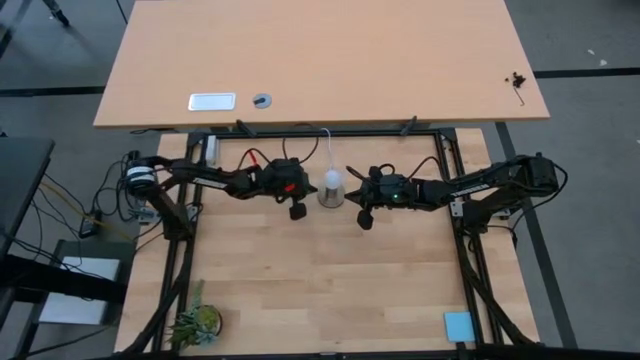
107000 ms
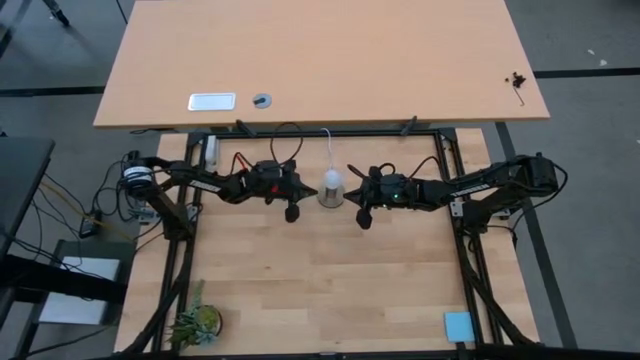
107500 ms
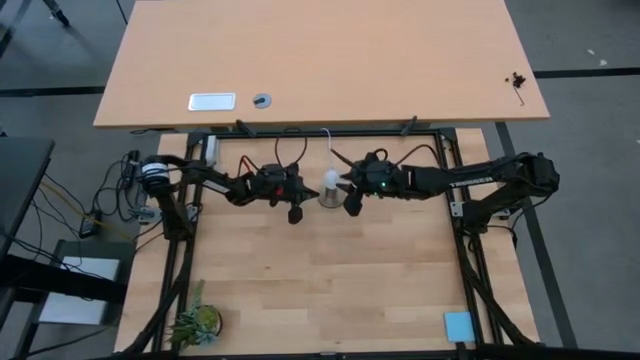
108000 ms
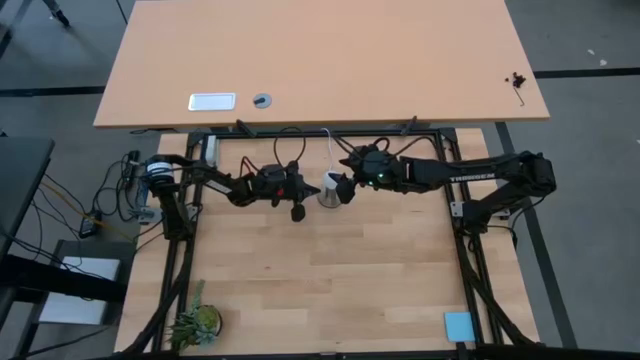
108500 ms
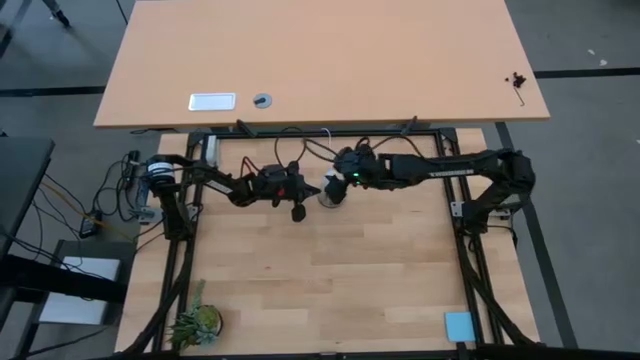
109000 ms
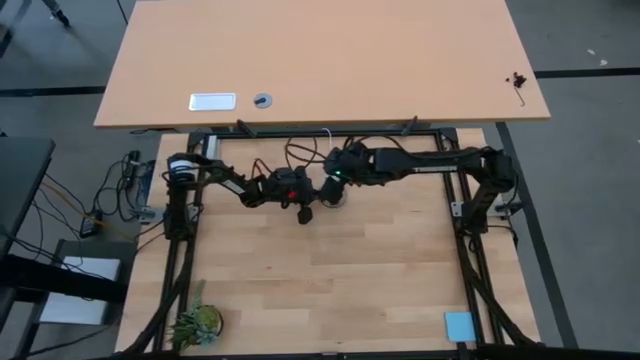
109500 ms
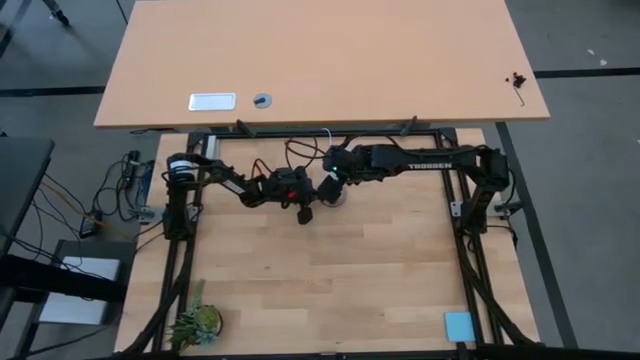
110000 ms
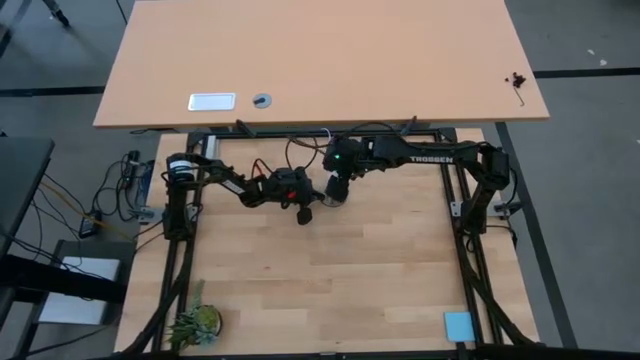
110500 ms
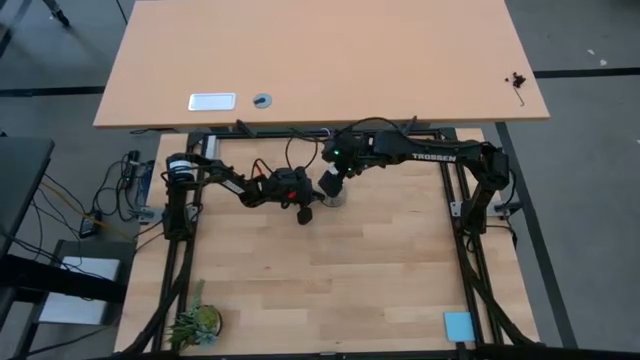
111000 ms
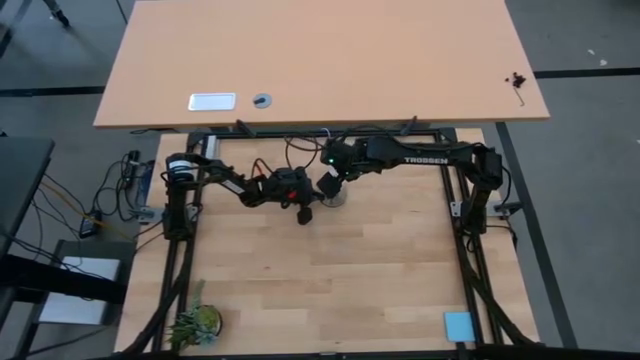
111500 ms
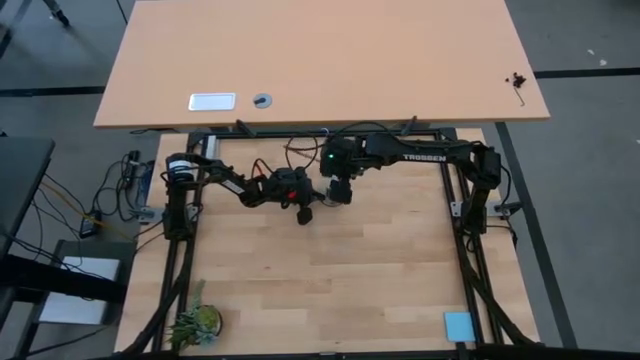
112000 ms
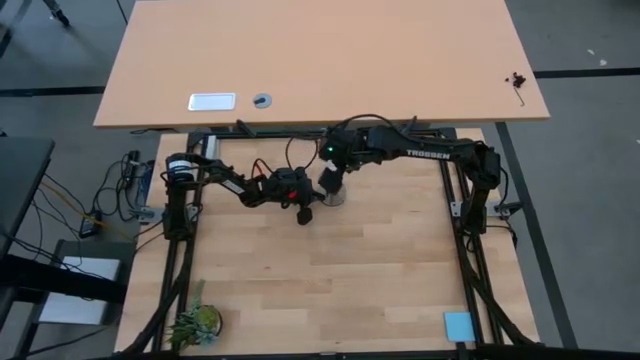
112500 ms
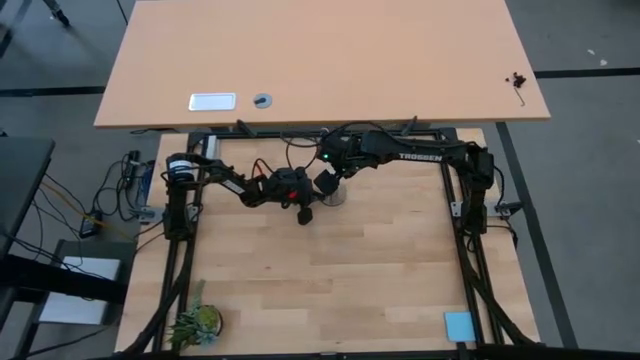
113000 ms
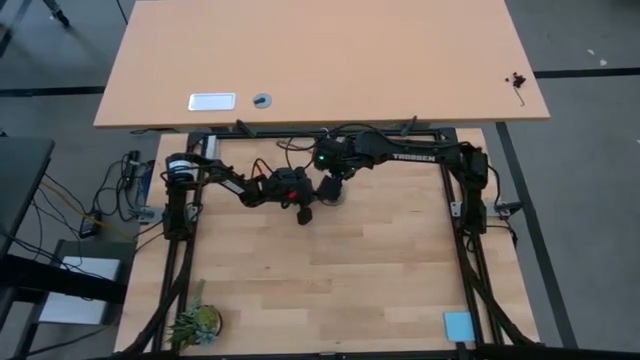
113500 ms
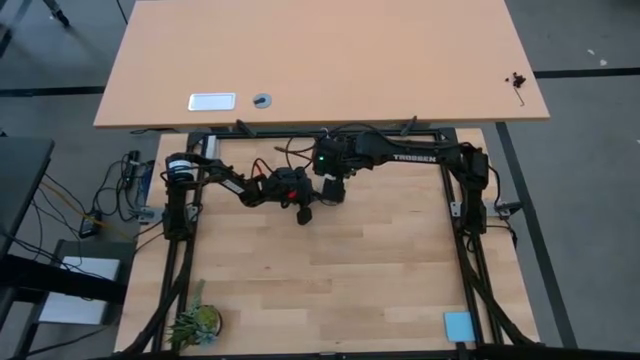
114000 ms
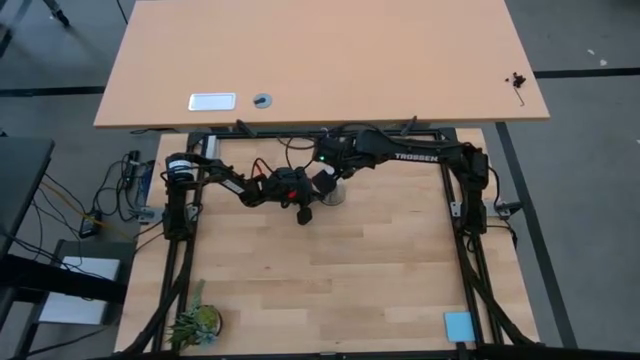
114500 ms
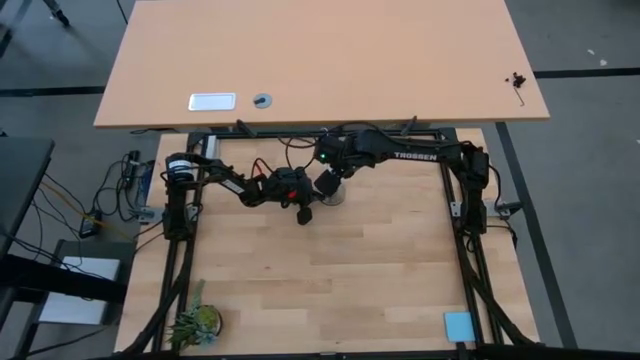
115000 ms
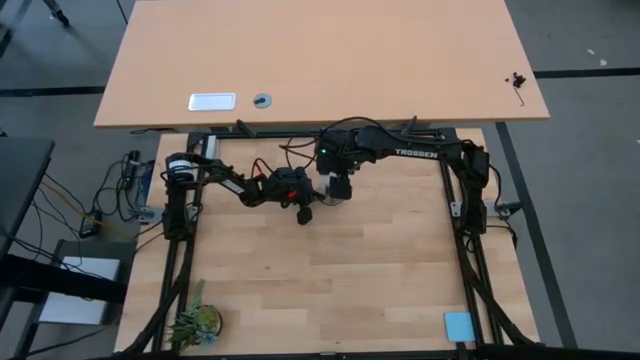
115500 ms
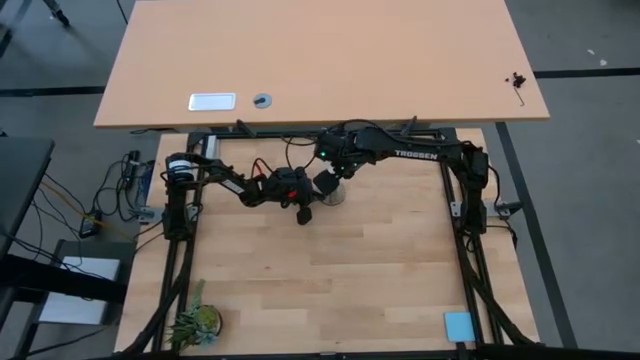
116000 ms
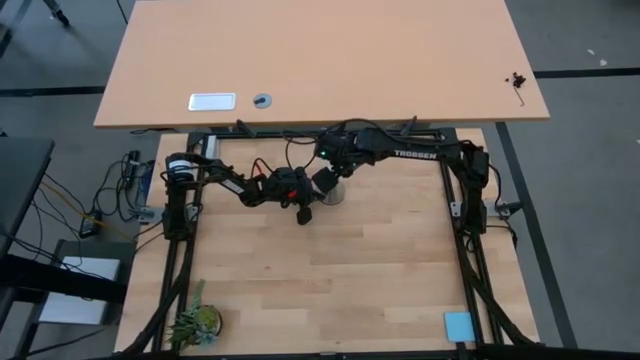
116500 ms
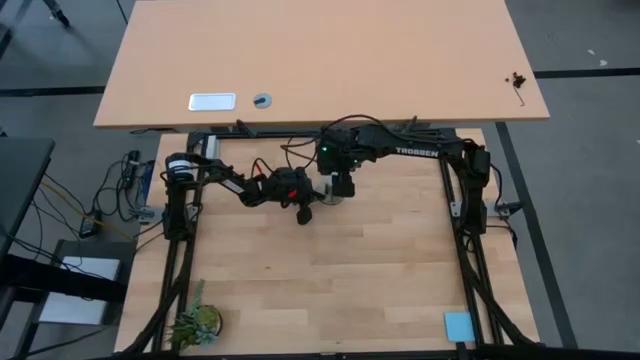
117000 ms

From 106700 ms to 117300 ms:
Task: Screw lightbulb
Remove the white lightbulb from the gold lamp

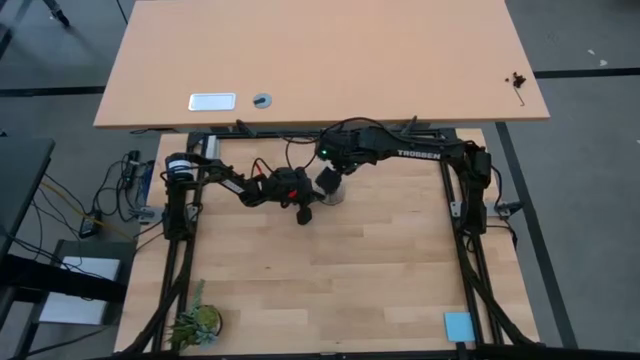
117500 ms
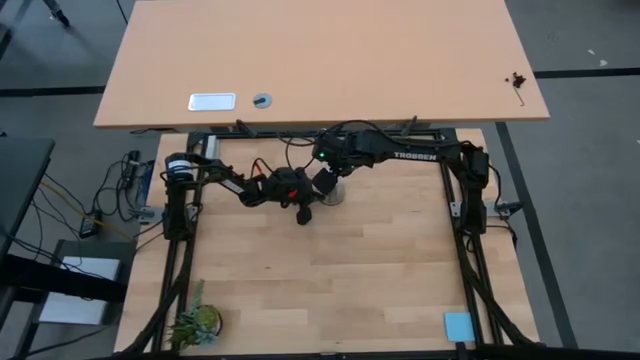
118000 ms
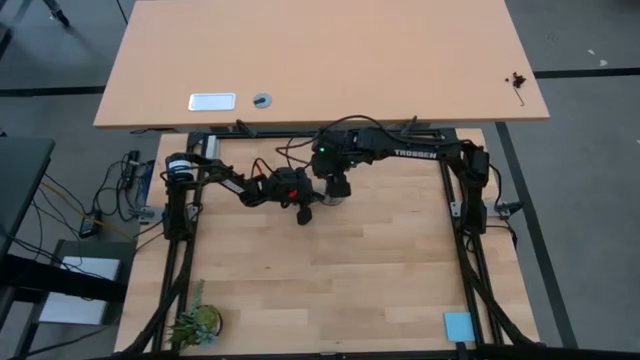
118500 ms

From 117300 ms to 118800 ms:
Remove the white lightbulb from the gold lamp

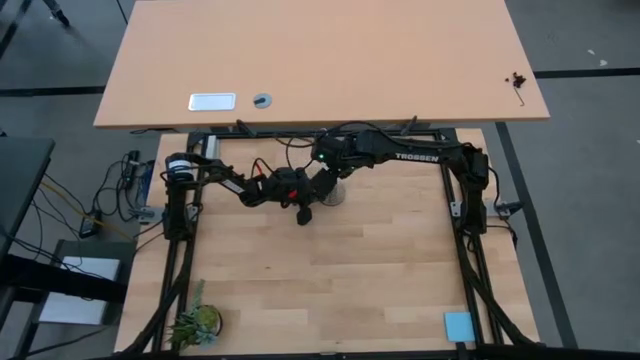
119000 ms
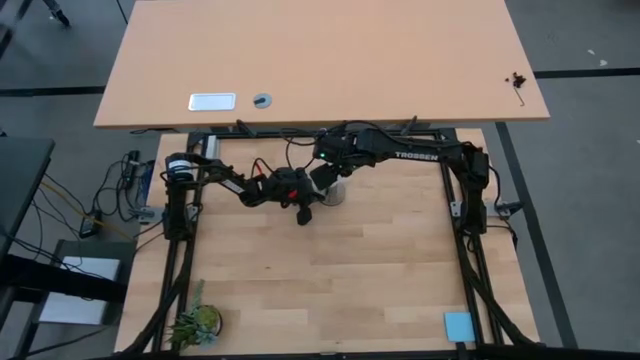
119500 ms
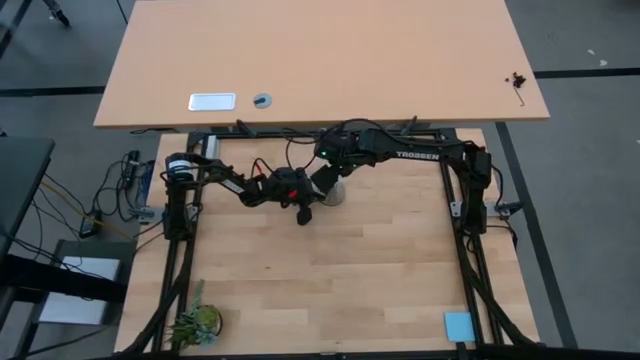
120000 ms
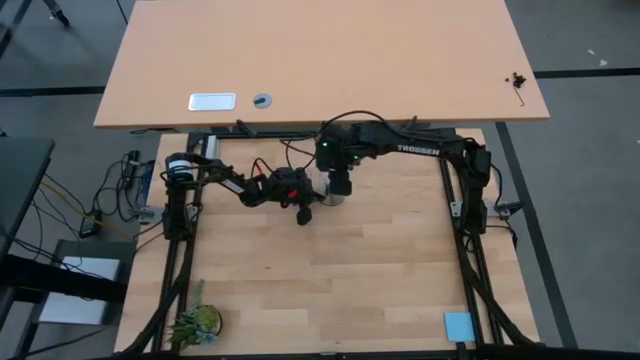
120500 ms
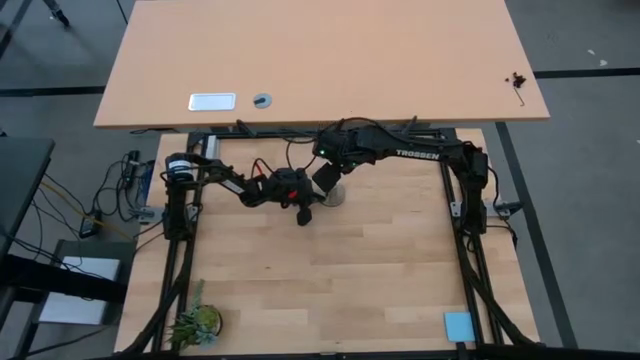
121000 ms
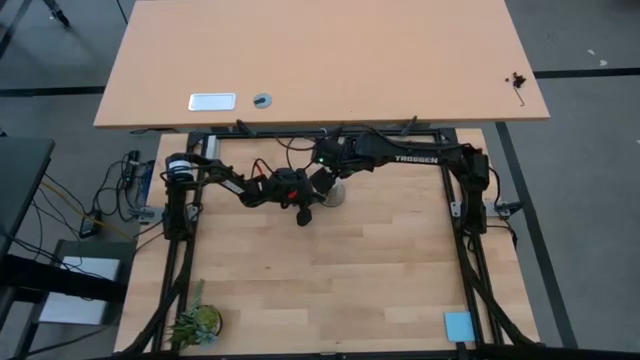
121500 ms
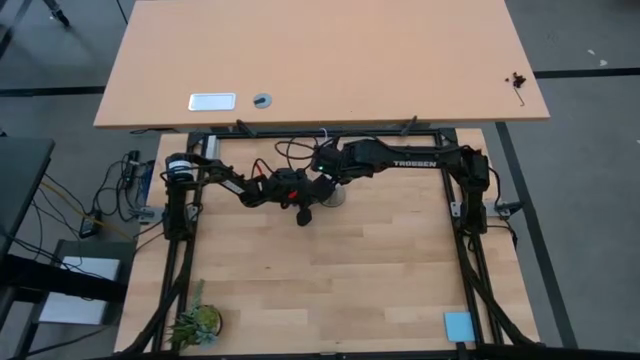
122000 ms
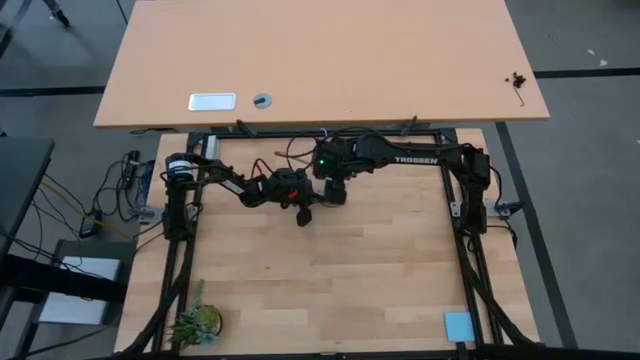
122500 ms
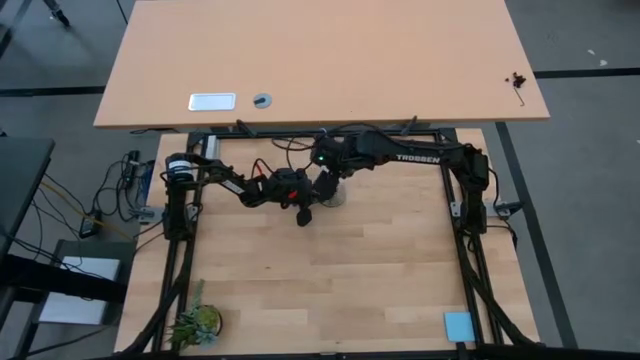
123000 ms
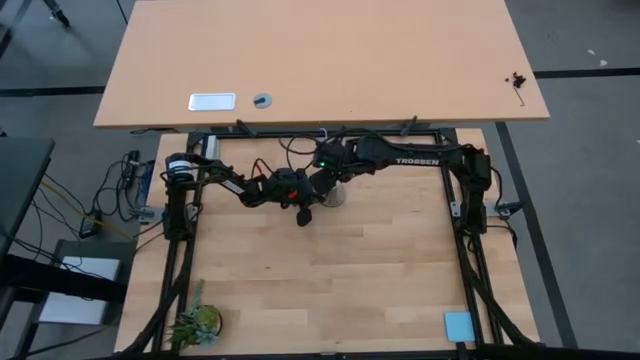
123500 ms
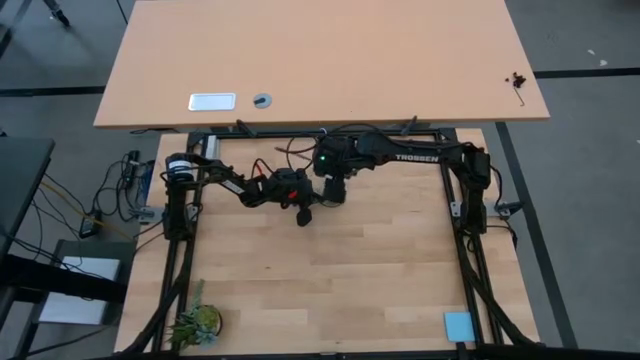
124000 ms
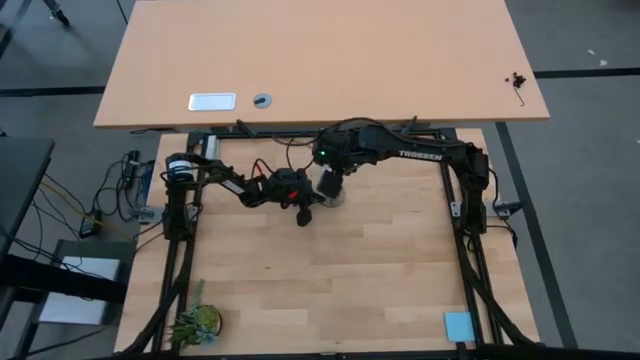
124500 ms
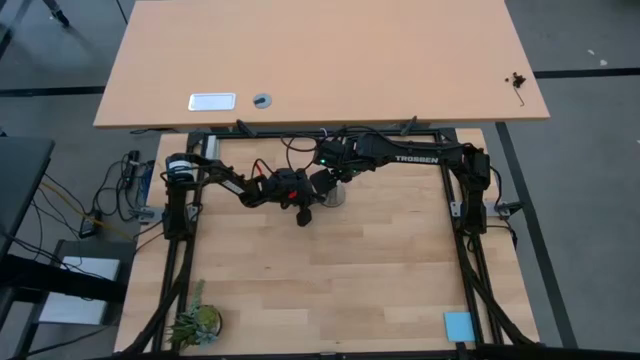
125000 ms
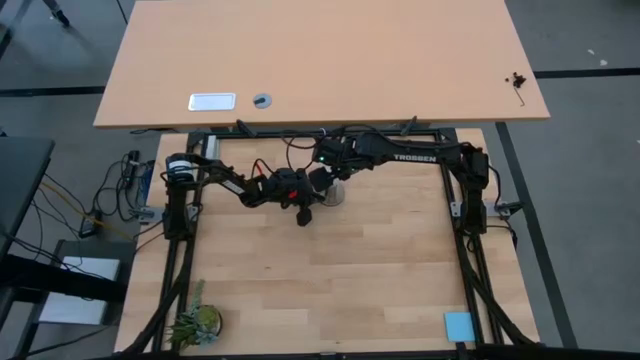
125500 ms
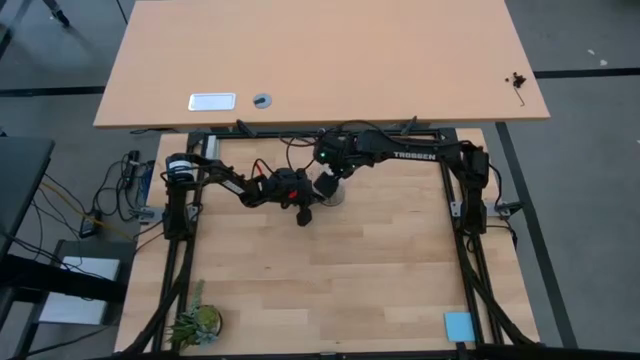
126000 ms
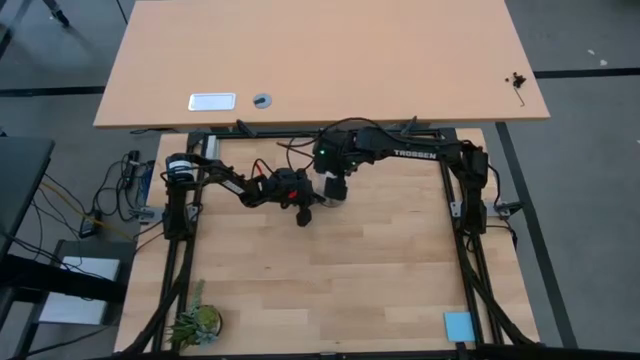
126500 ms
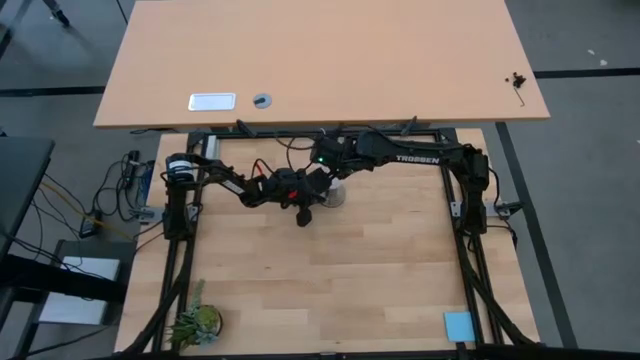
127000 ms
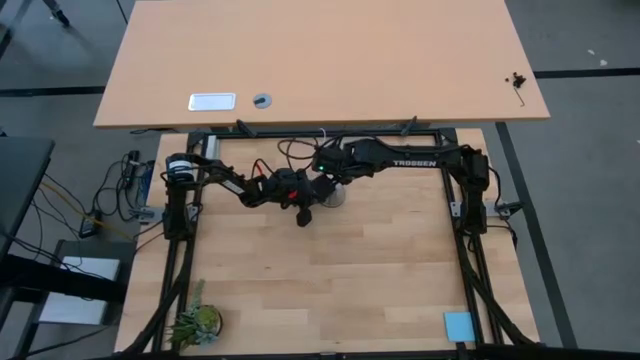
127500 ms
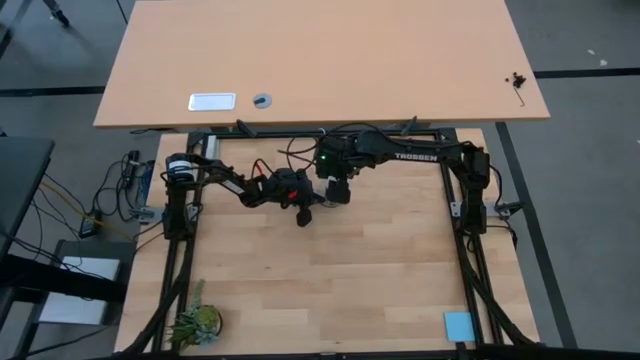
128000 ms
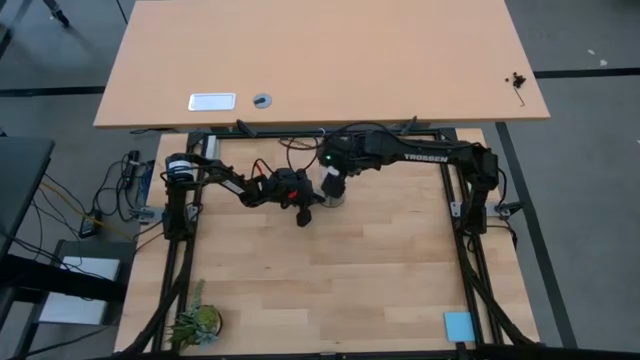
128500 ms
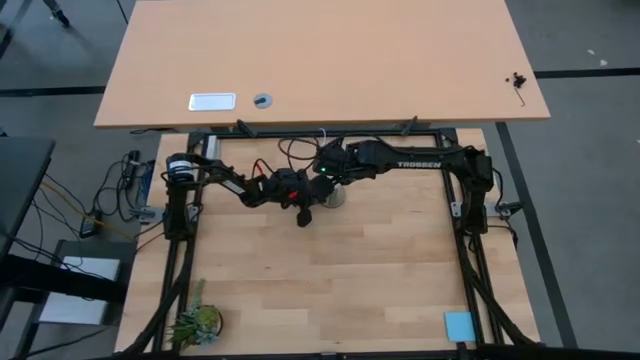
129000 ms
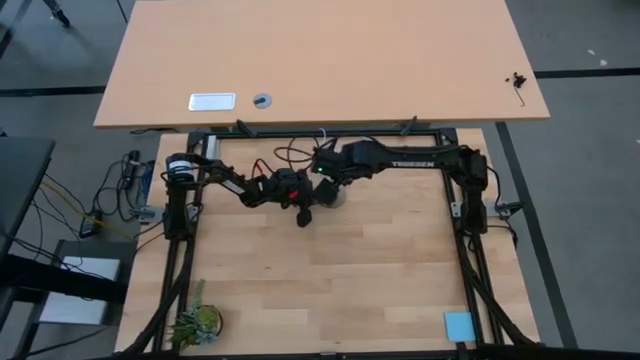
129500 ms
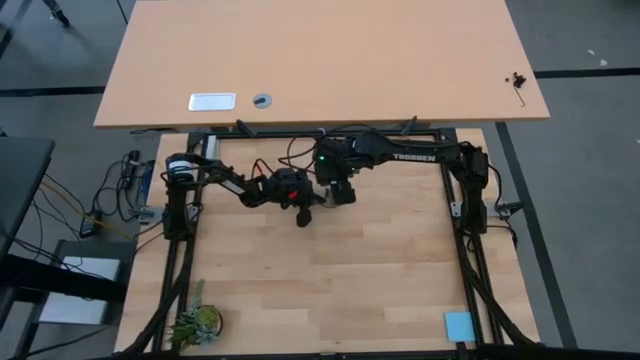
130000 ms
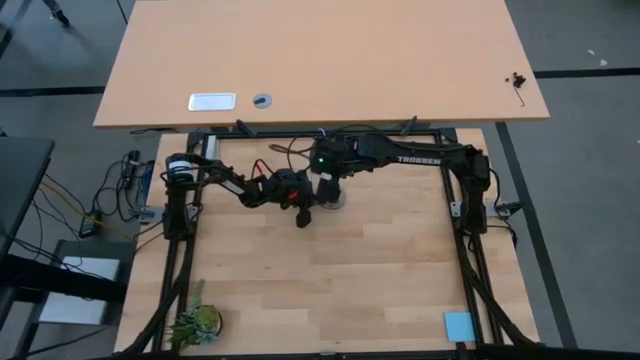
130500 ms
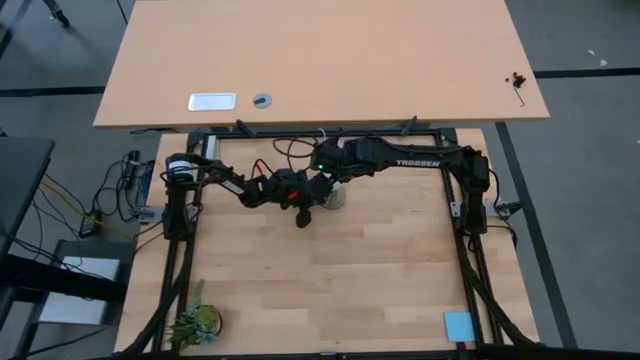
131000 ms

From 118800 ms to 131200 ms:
Remove the white lightbulb from the gold lamp
